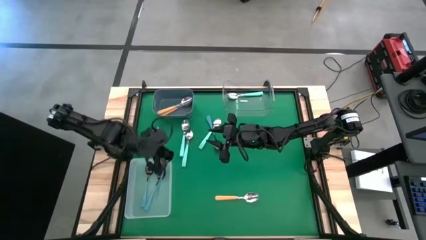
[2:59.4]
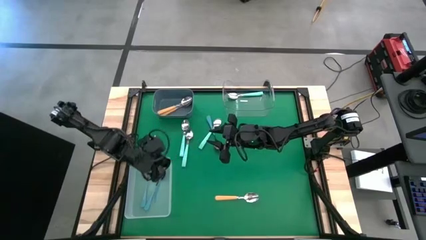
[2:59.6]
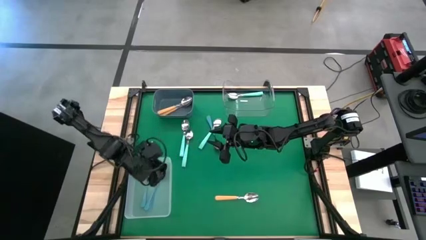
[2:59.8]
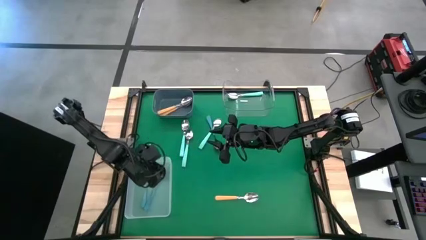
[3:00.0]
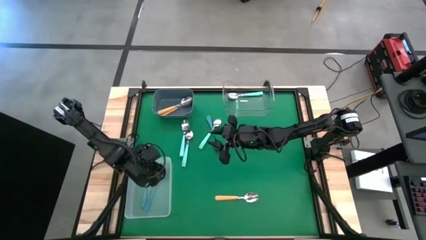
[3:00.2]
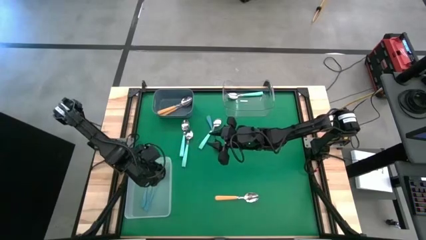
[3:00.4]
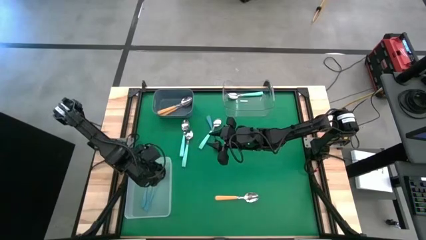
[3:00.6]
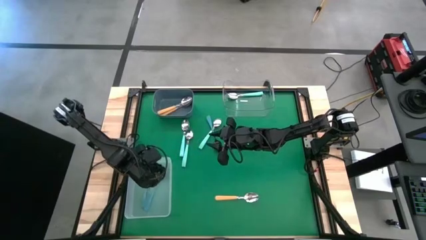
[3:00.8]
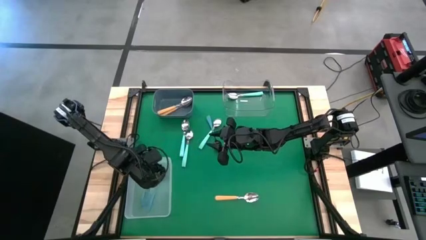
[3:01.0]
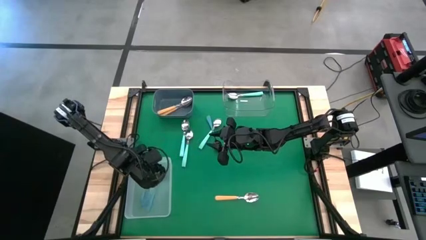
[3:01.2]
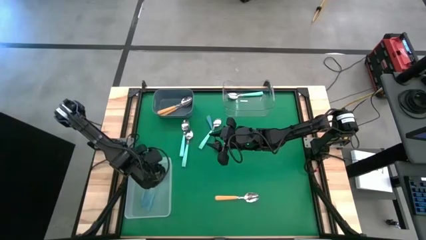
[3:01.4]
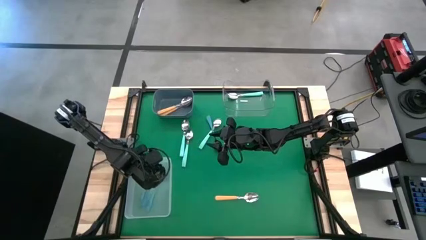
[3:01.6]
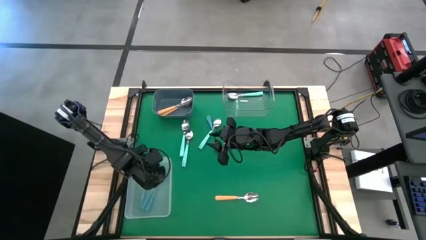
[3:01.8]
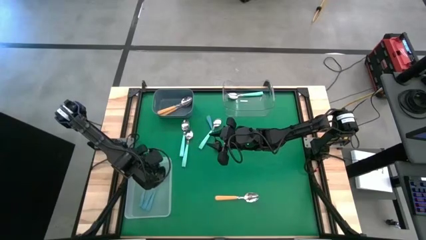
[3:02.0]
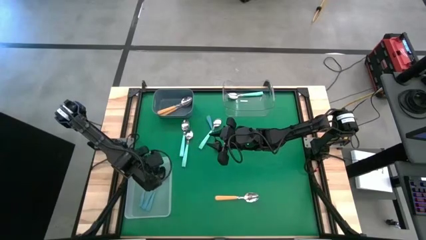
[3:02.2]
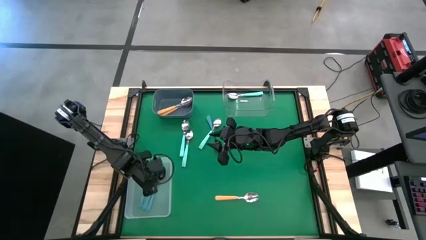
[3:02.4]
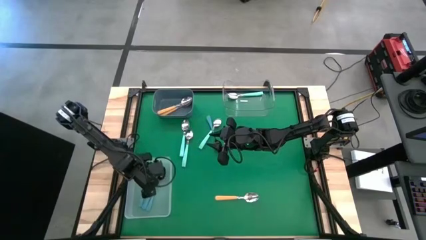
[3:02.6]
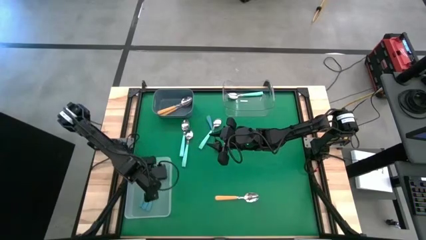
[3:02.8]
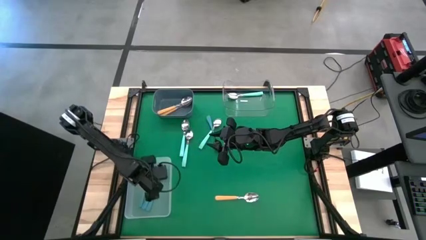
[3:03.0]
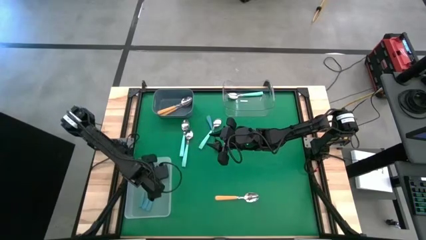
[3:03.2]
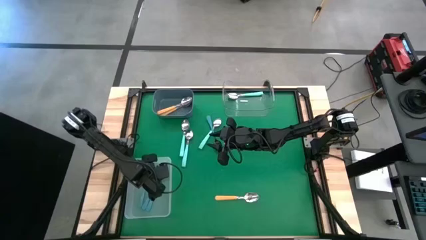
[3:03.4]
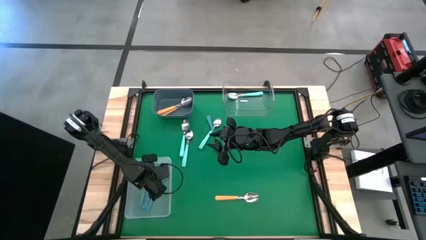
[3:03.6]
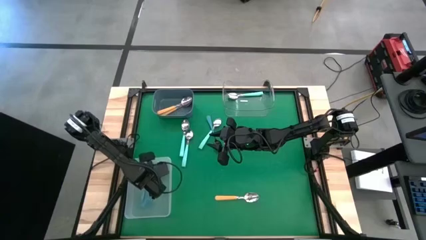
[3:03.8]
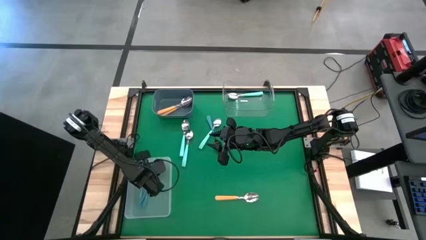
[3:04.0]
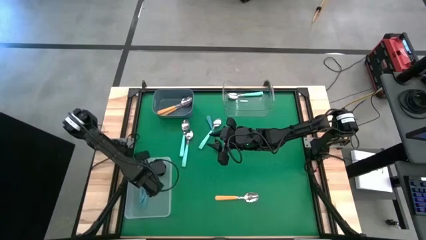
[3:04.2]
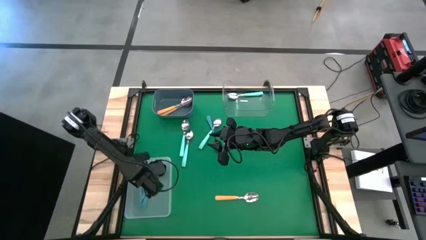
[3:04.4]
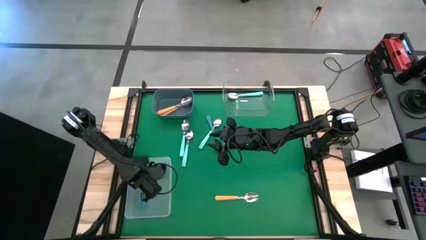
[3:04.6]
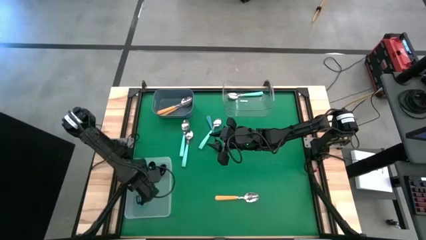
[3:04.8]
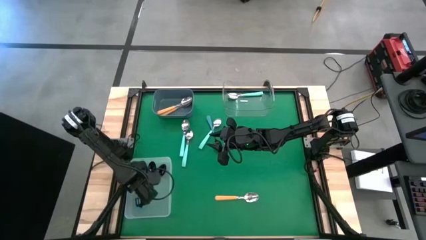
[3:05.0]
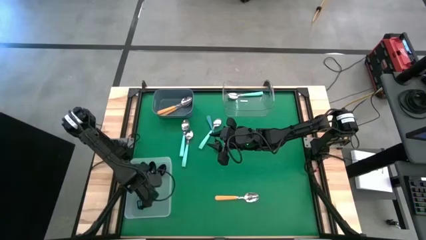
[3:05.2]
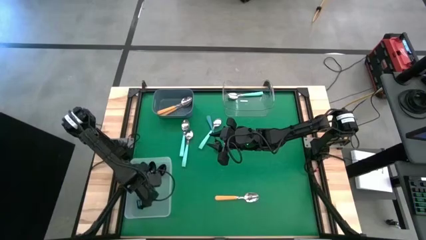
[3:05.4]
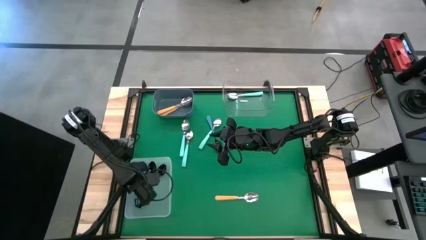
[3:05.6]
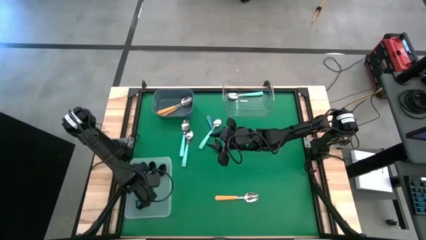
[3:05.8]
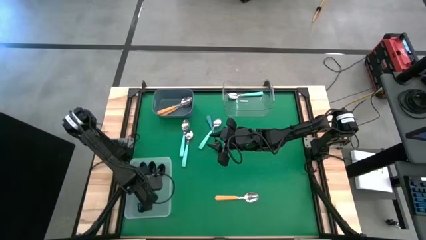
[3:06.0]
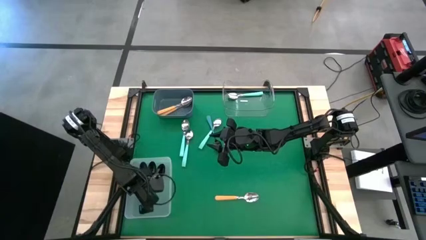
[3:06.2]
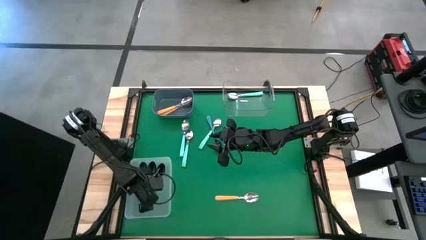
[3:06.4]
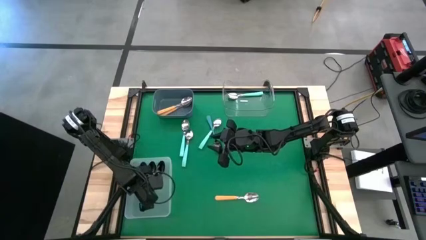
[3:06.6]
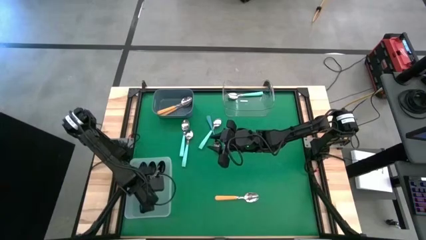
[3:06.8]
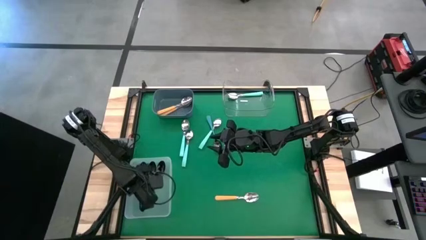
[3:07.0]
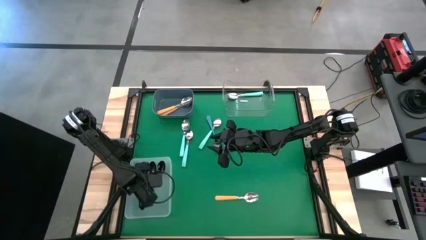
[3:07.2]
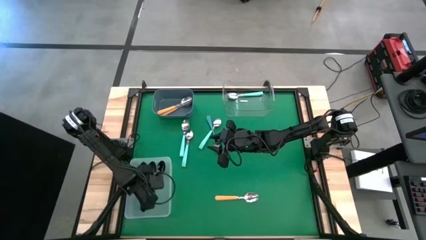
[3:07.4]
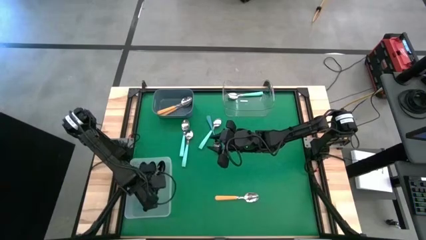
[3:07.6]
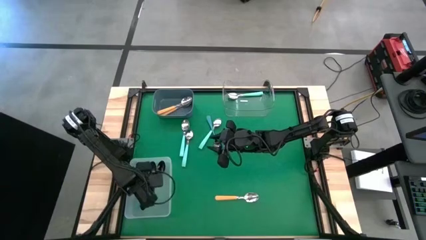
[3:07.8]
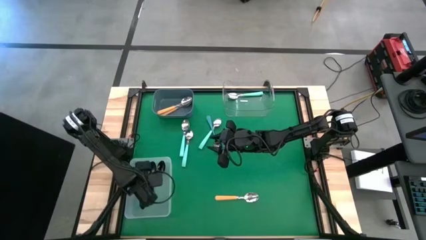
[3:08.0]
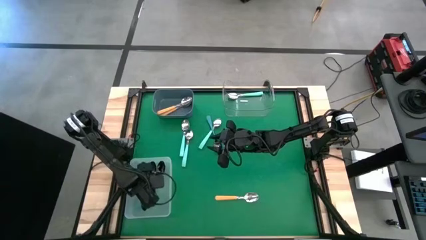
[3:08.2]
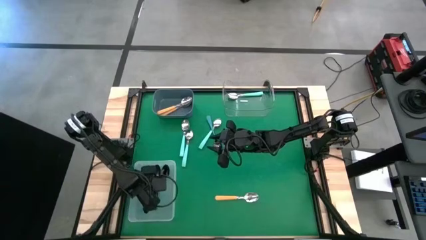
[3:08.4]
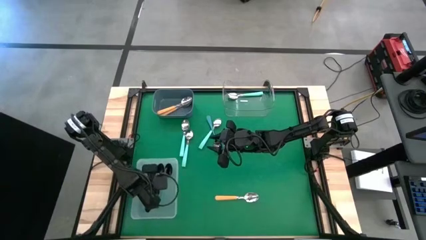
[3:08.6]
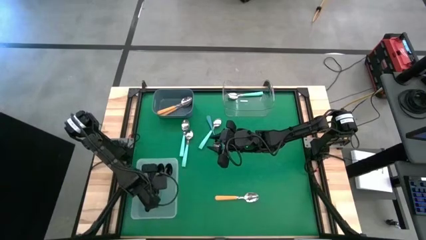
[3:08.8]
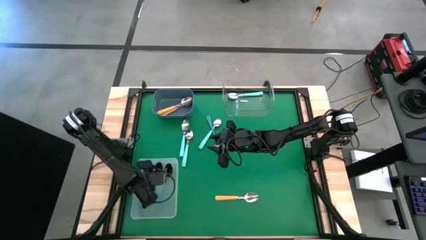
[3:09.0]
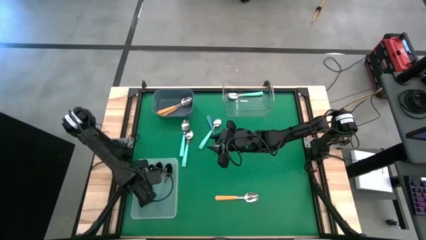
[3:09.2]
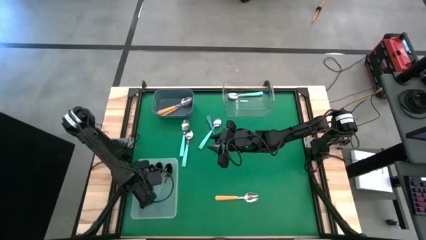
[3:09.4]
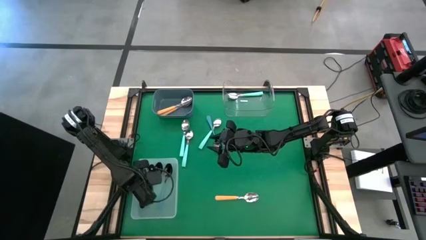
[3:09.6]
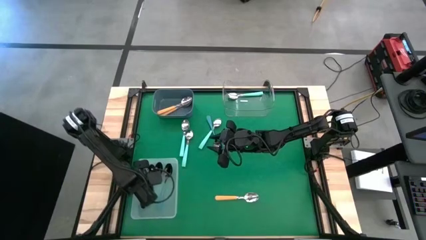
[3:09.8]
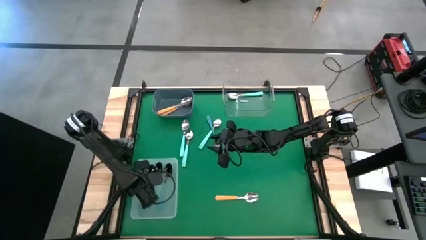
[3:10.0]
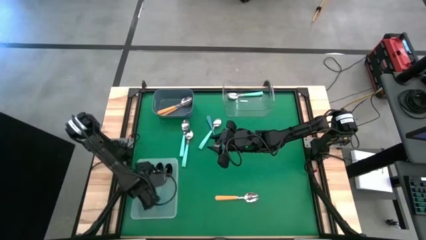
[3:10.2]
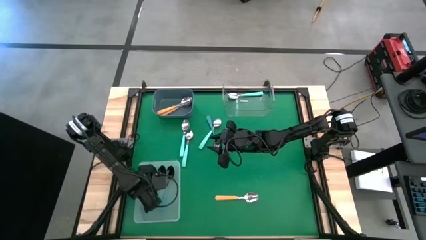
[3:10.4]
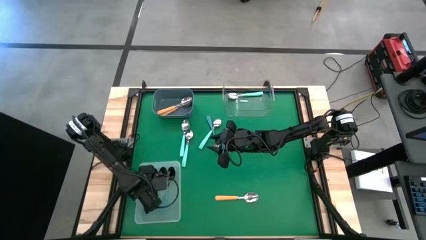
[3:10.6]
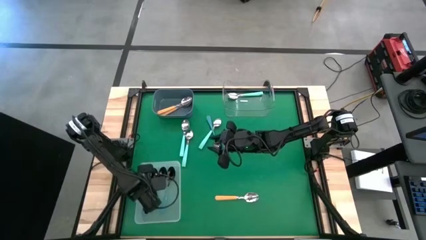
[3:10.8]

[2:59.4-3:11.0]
Task: Sort silverware by color (type)
Put the dark blue spoon into the white bin

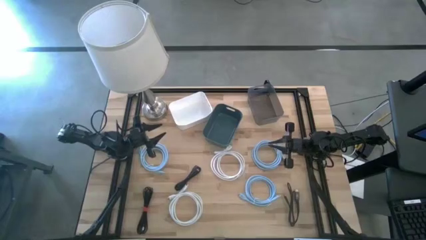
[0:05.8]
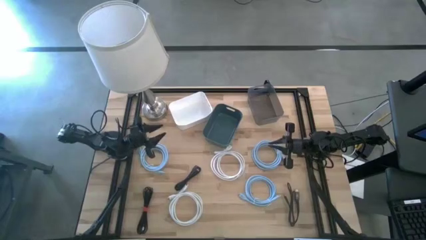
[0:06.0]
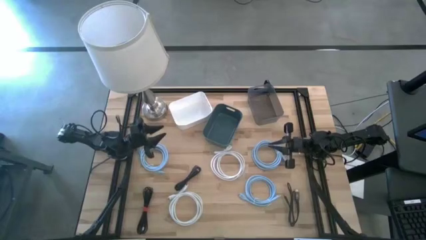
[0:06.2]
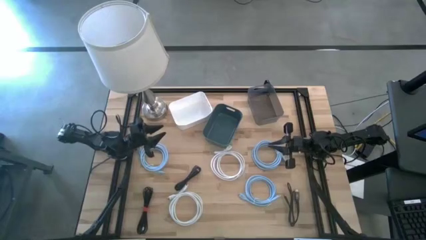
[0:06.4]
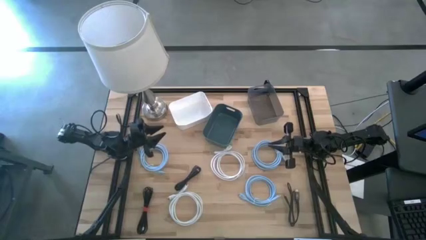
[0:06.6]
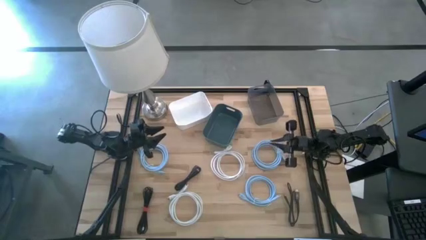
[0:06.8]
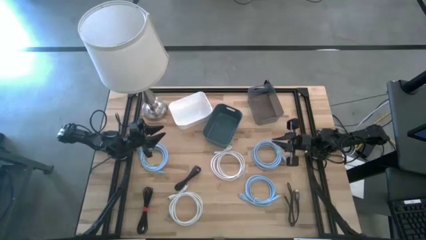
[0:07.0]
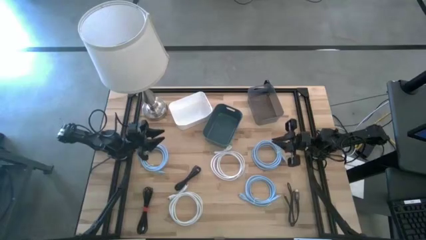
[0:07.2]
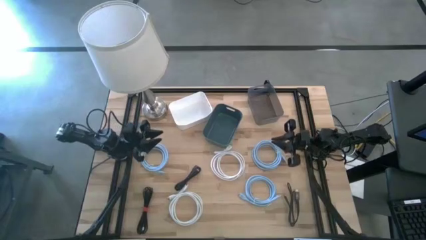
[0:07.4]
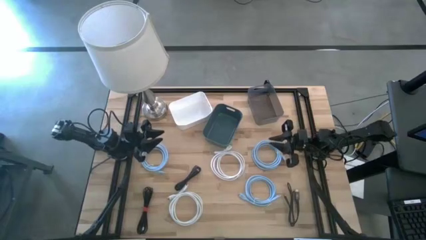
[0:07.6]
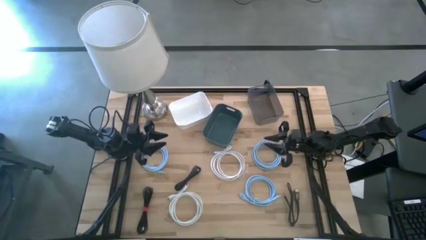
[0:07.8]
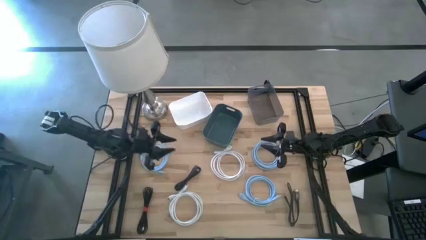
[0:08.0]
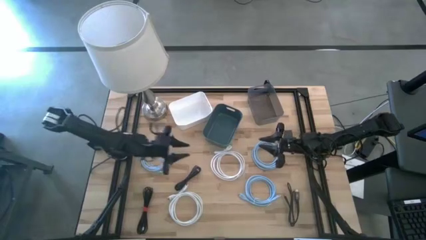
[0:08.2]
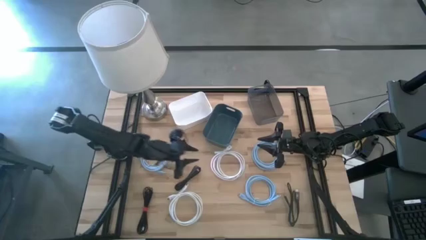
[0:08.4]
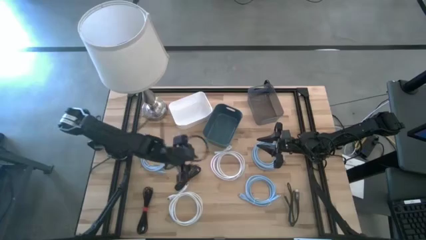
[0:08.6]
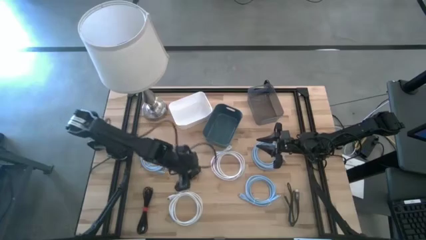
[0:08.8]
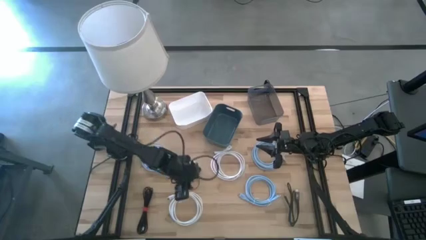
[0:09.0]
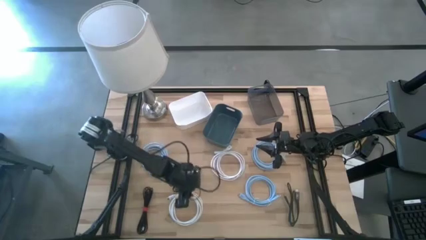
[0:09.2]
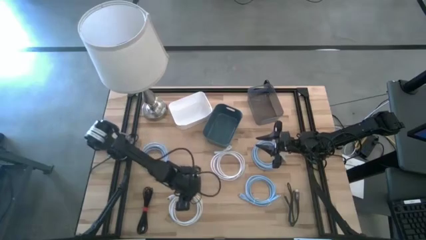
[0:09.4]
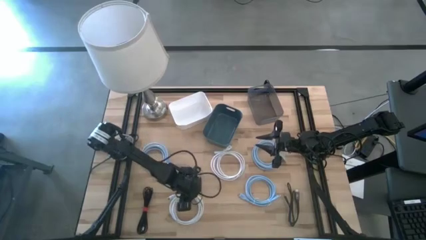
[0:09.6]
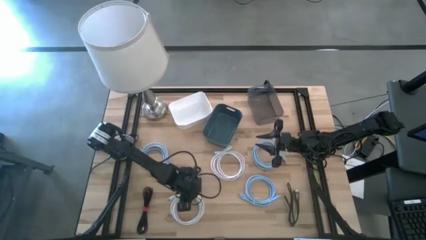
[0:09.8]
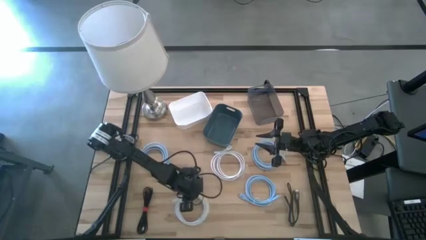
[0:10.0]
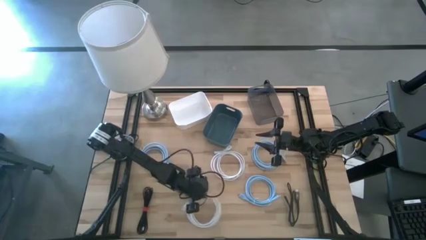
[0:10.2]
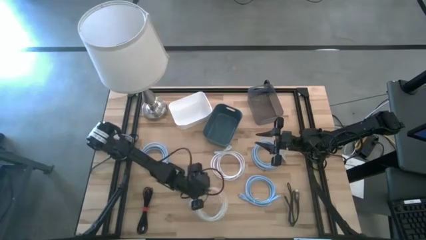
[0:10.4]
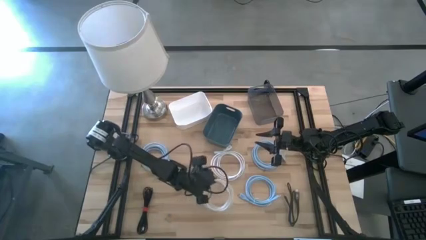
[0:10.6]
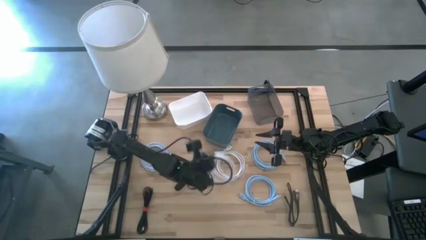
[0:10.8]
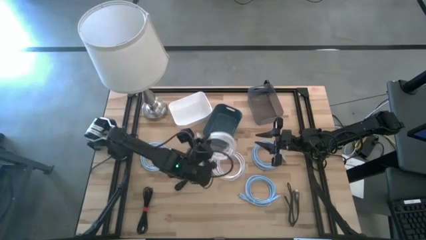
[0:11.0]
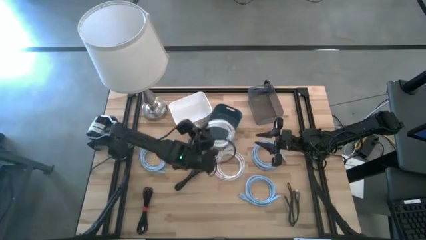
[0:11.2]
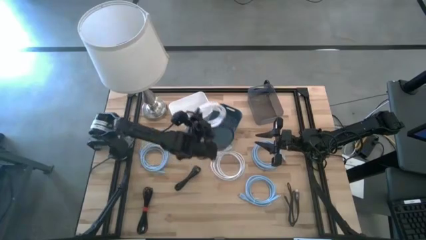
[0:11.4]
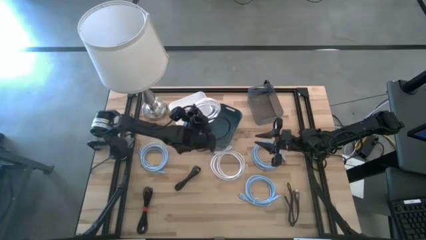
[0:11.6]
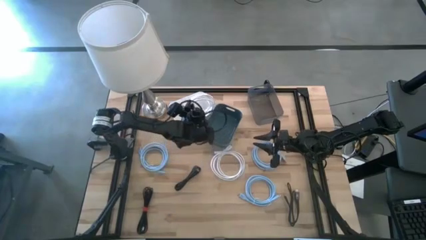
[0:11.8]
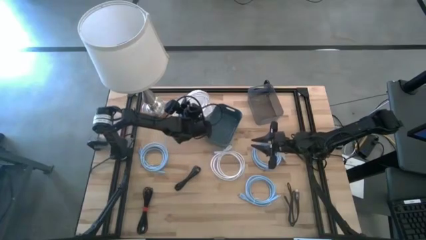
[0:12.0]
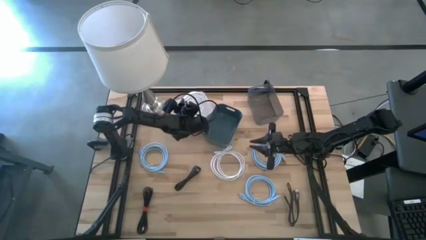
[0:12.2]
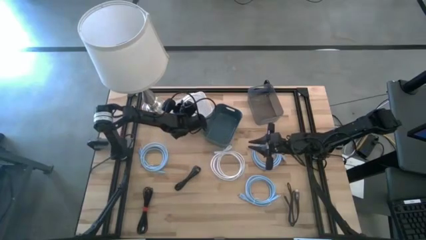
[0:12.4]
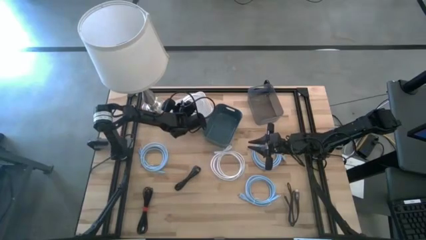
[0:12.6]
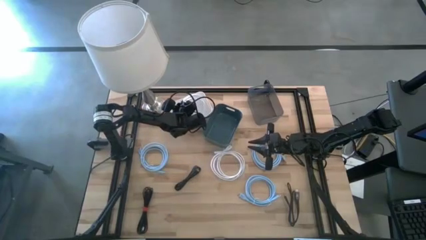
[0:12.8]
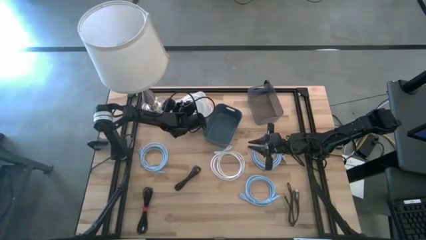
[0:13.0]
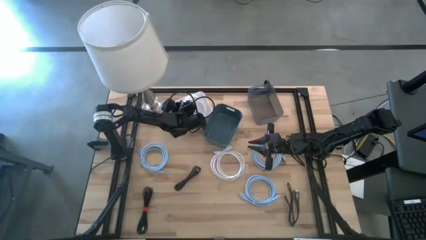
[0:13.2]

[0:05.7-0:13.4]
Task: Sort HDMI cables
Put the left white HDMI cable into the white bin
